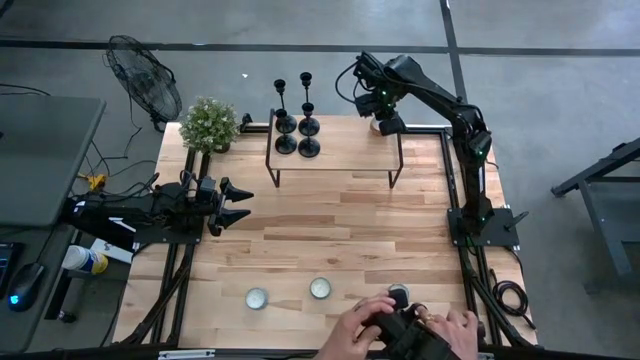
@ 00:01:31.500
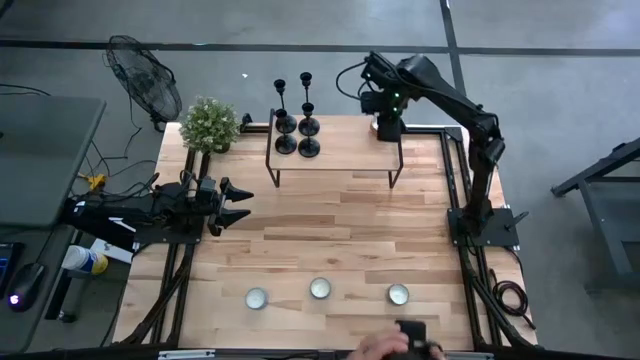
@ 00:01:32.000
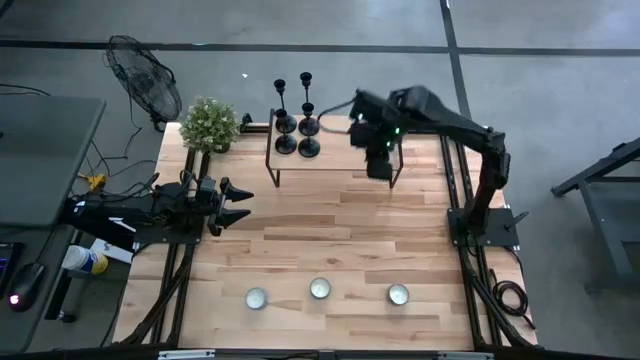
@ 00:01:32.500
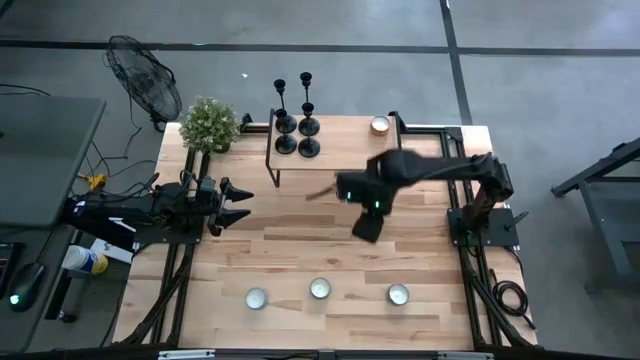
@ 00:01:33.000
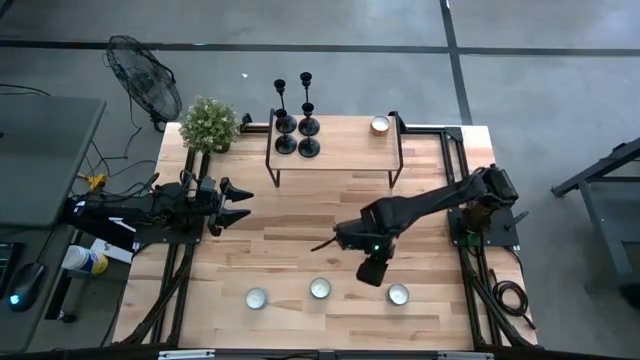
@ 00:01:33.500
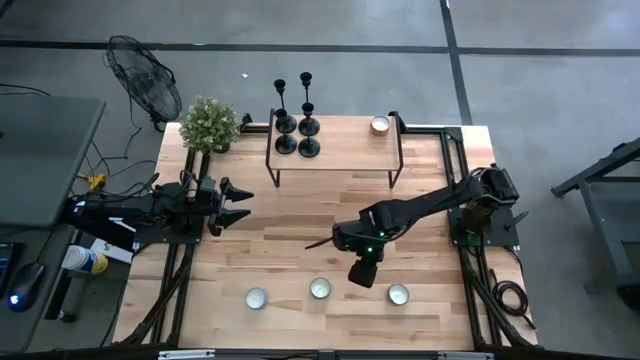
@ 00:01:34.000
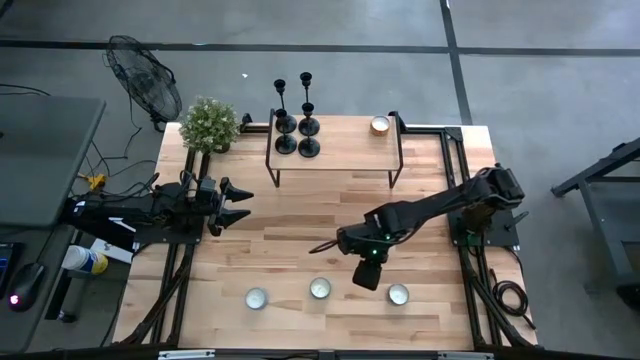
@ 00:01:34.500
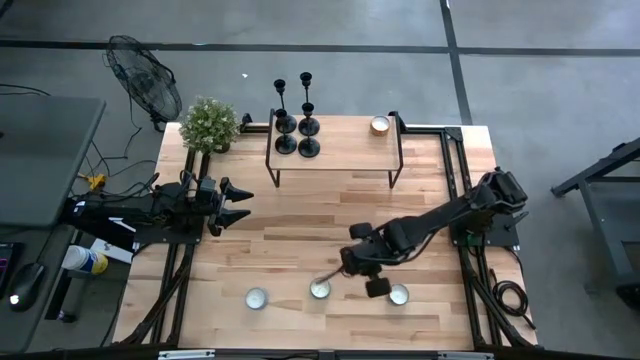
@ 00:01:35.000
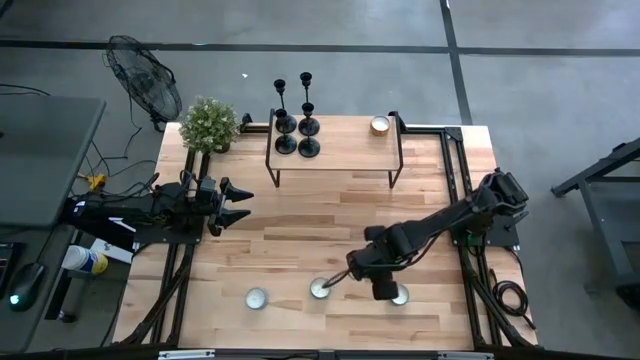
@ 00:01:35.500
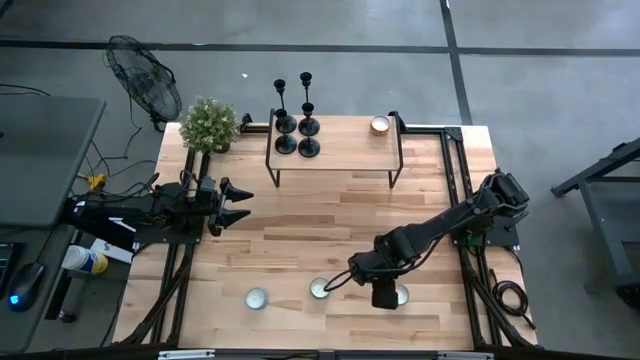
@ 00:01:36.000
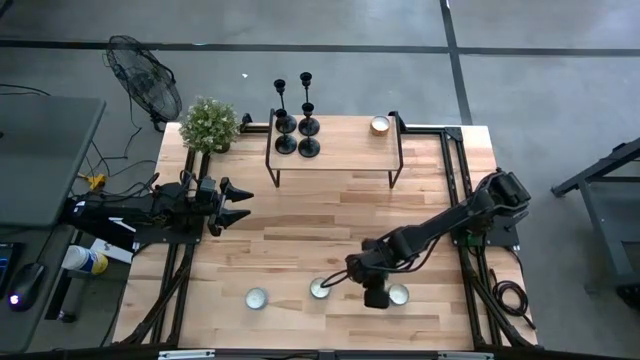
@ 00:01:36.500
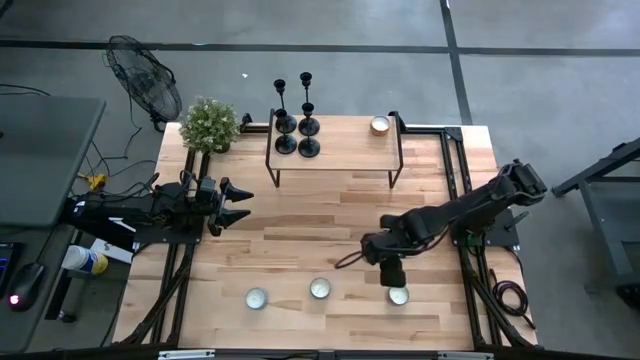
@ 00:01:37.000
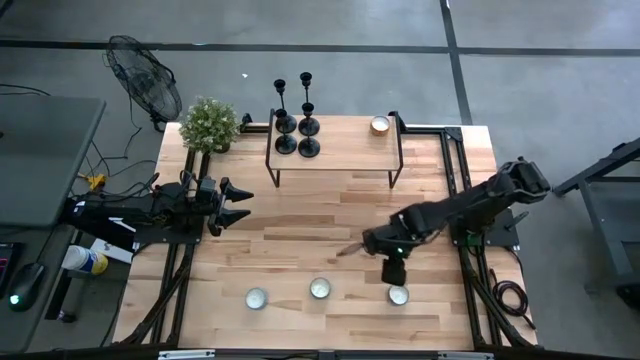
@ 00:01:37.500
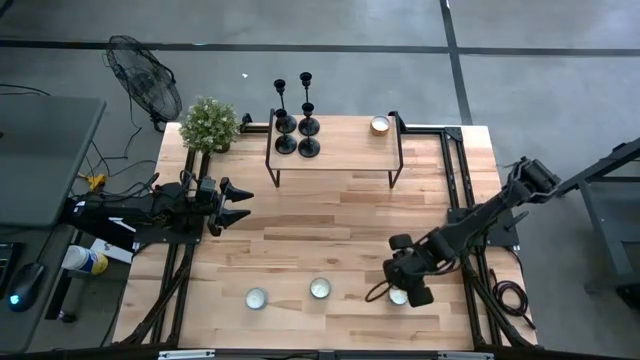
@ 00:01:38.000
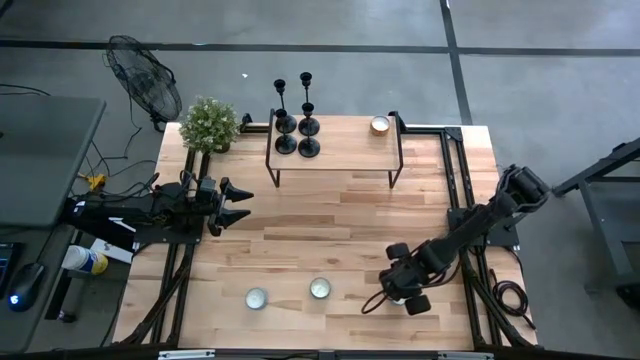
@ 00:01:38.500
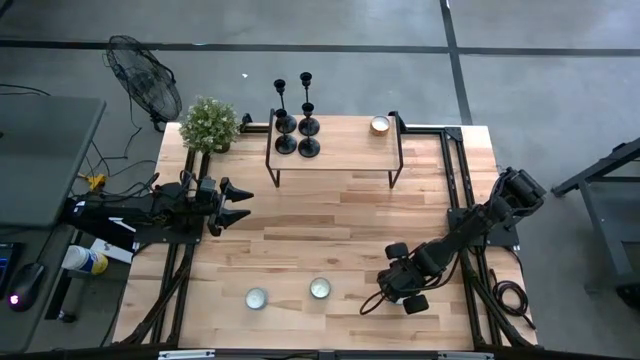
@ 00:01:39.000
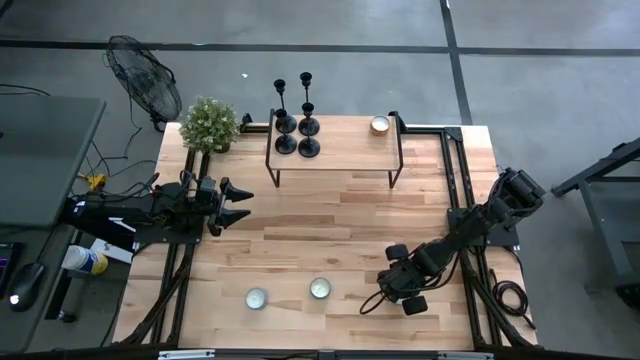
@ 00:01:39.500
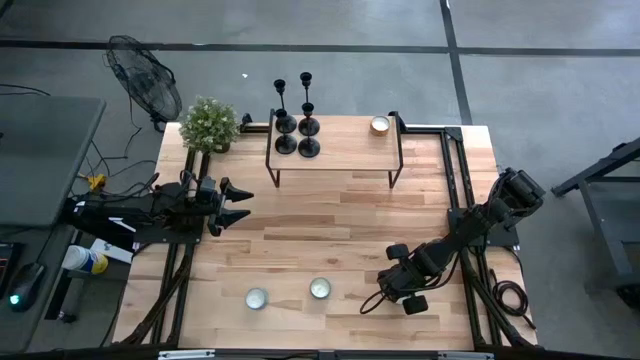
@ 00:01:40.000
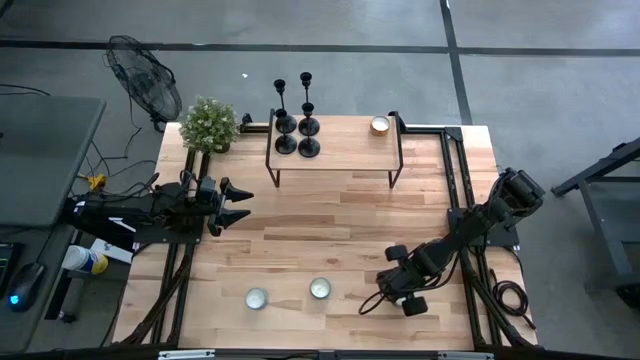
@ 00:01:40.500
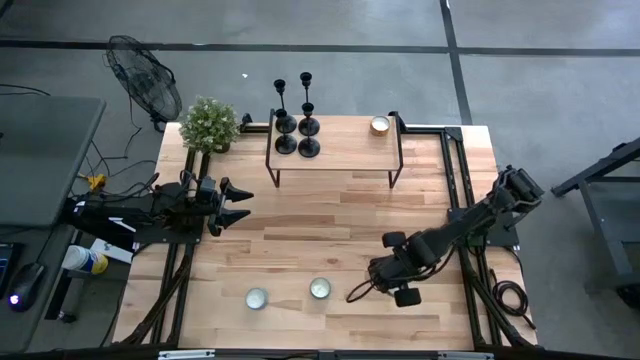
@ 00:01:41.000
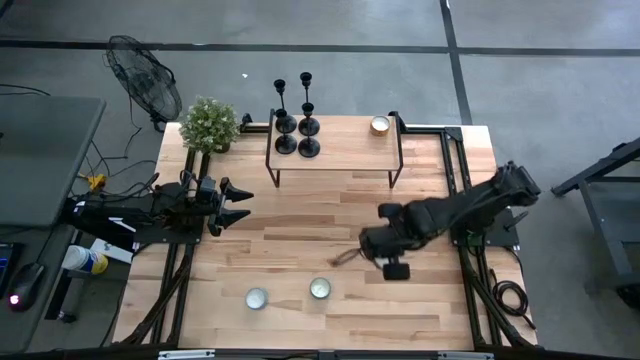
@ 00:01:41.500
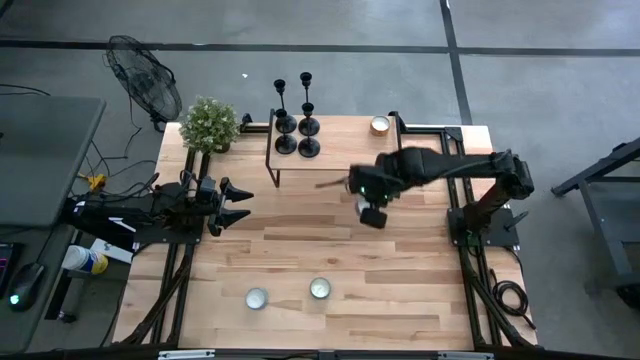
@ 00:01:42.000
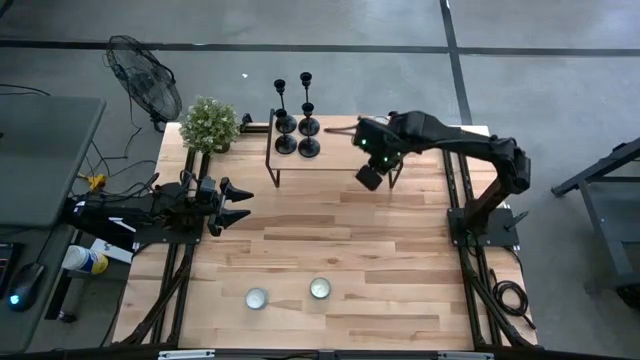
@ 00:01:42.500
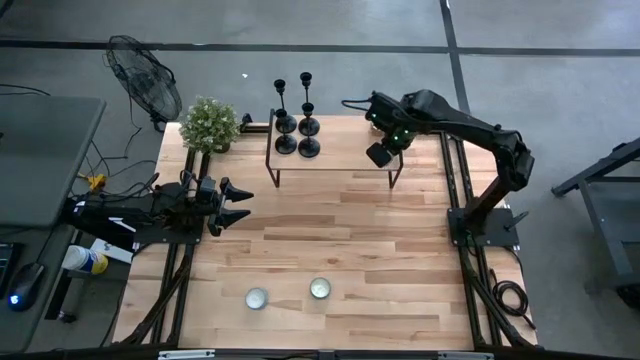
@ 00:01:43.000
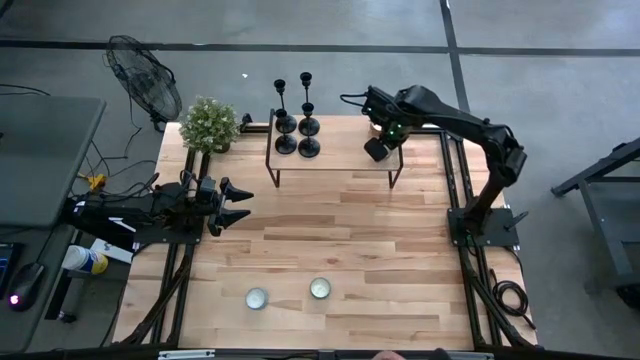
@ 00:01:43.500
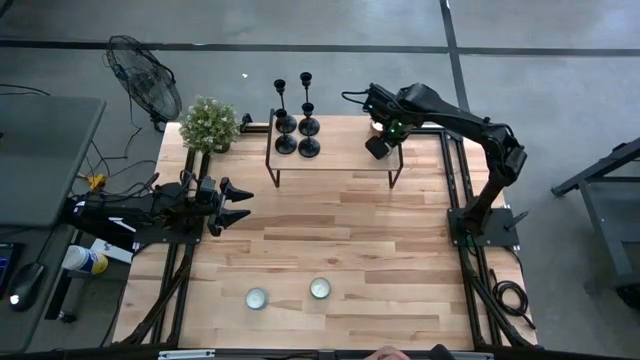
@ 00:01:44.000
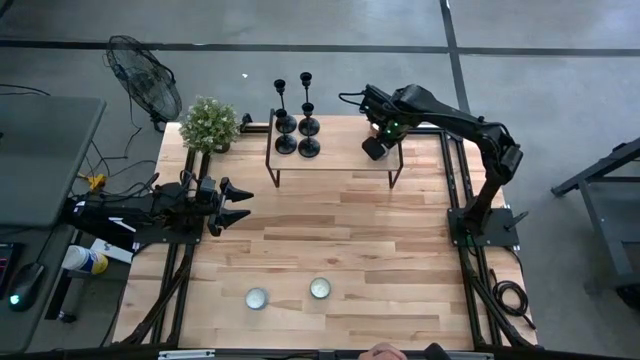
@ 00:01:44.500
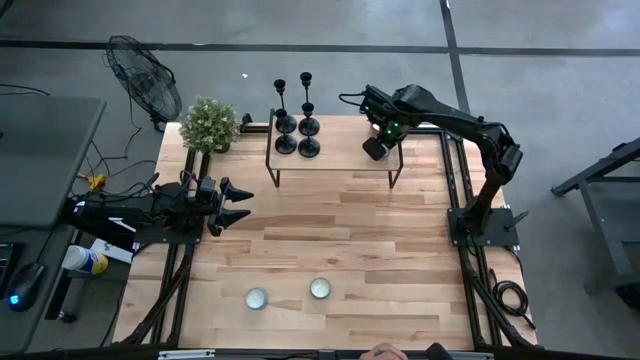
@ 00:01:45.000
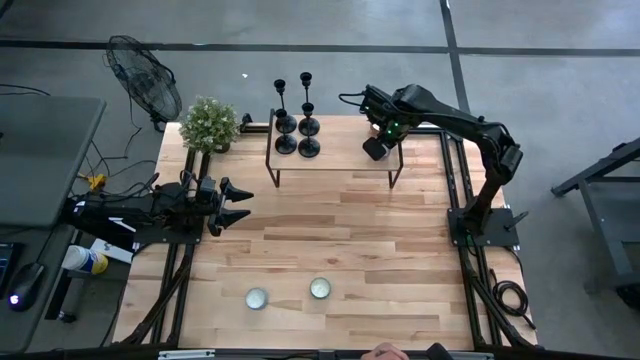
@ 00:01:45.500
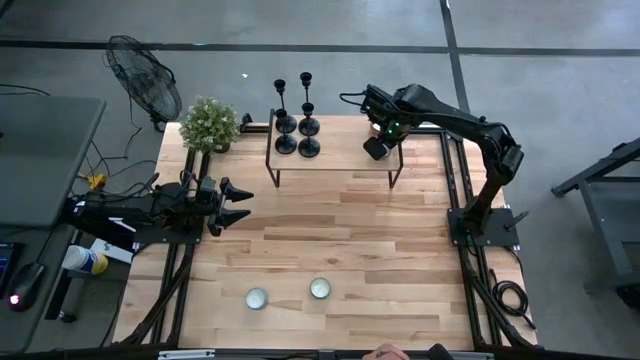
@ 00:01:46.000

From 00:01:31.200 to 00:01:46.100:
Task: Pick & Place candle stick holders
Put the red scented candle on the shelf

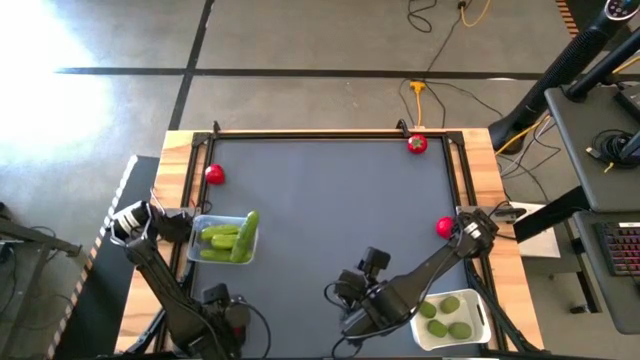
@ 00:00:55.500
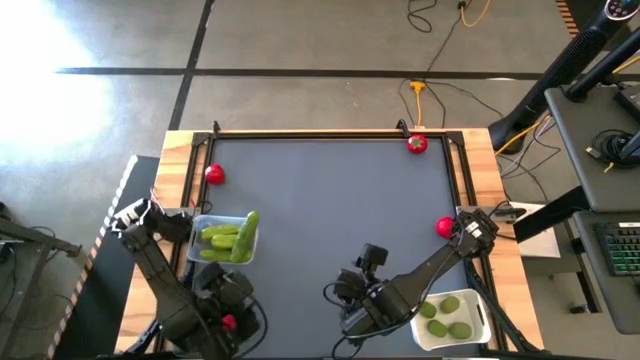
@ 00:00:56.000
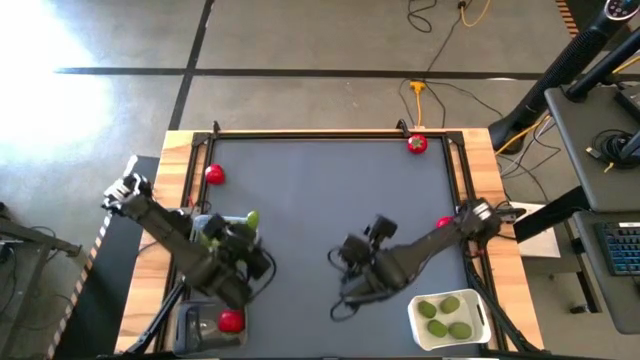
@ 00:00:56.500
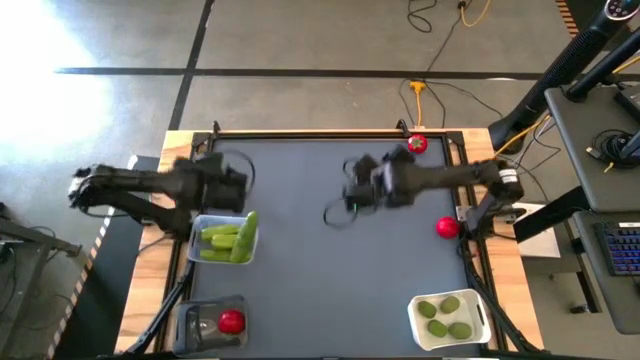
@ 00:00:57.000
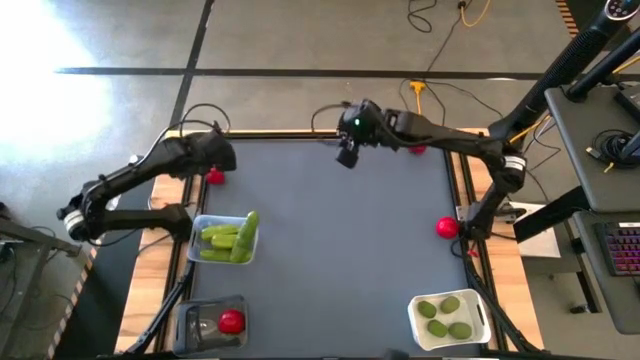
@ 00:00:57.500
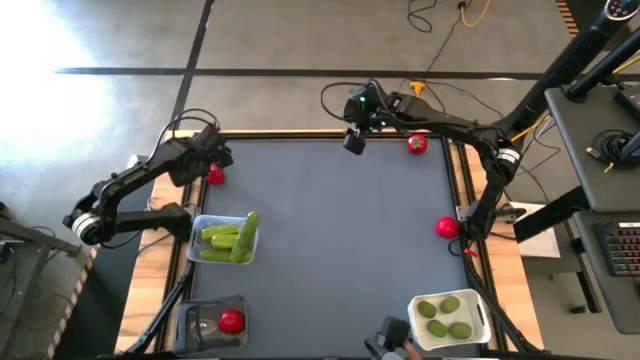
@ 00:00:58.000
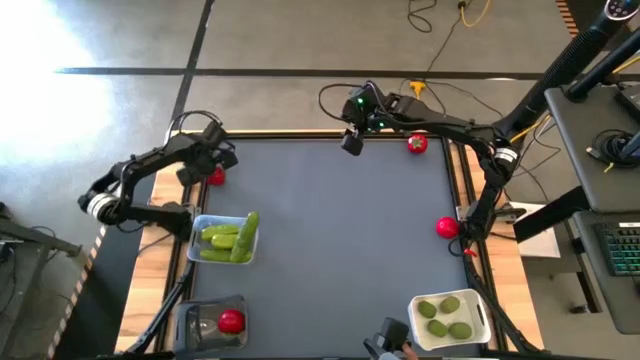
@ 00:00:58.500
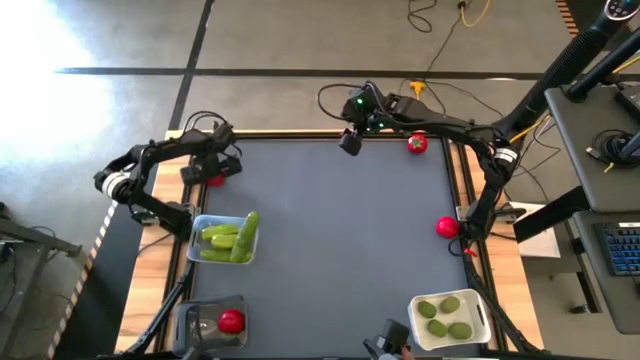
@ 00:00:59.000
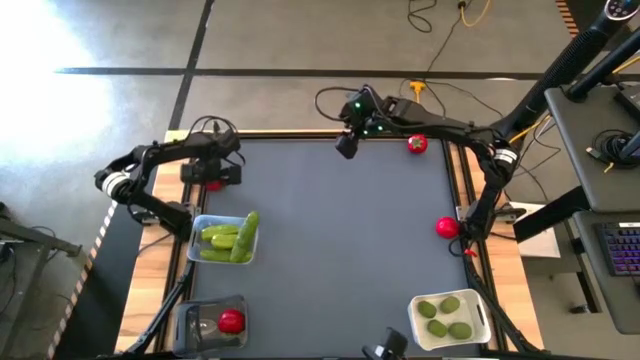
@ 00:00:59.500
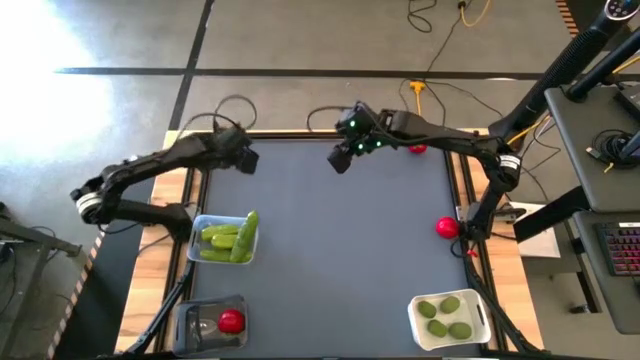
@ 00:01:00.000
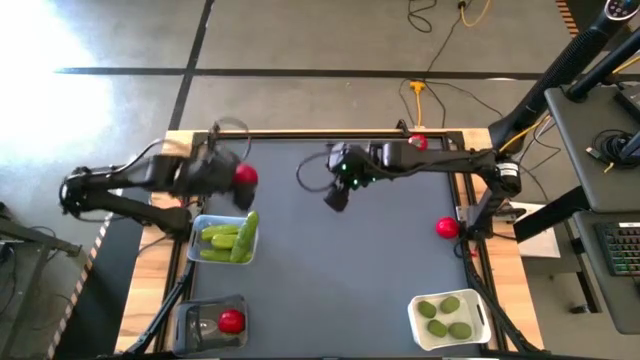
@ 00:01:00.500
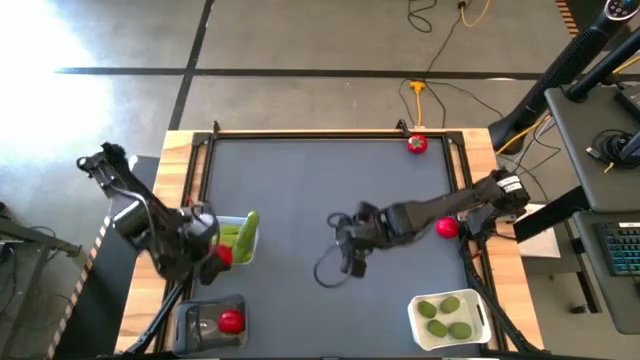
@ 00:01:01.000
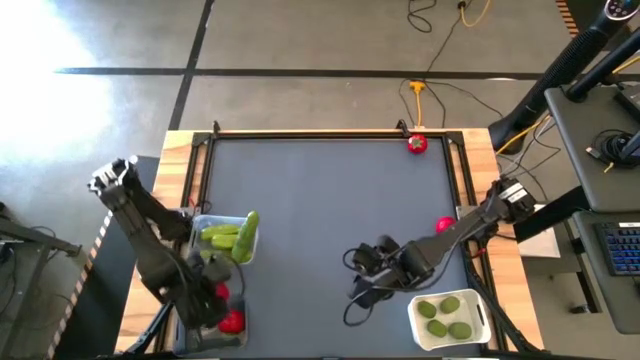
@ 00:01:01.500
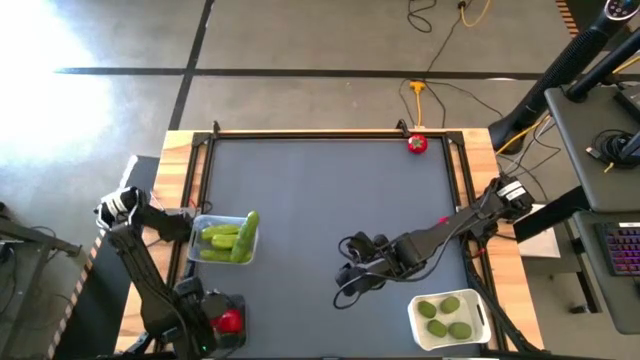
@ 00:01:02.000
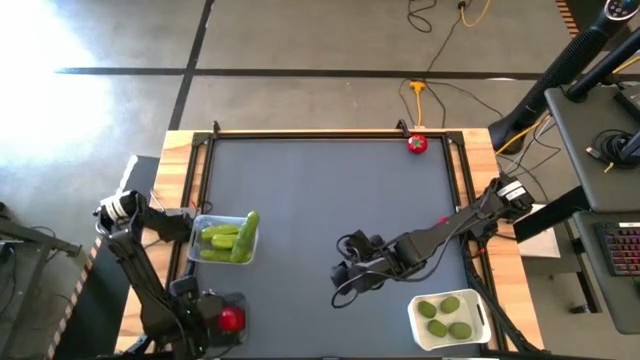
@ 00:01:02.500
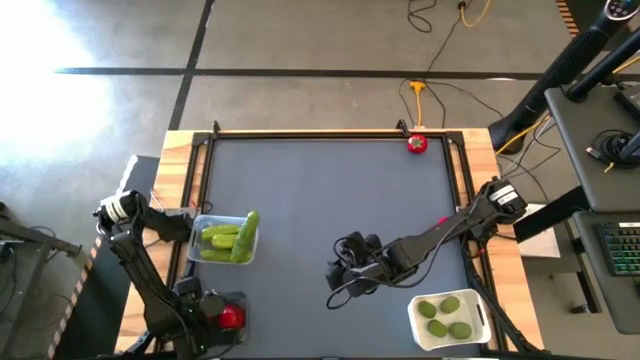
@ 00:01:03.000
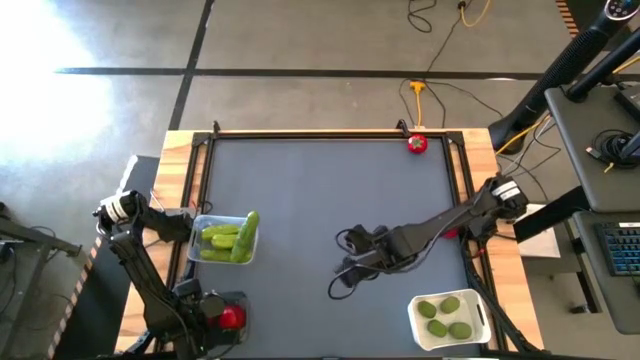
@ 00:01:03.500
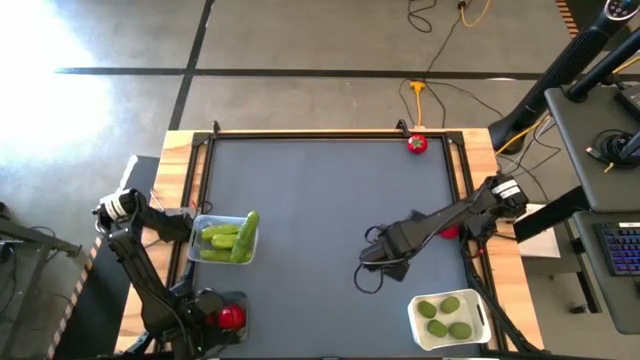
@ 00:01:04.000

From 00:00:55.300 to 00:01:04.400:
Task: Sort produce into baskets
Put the top left tomato into the black bin
